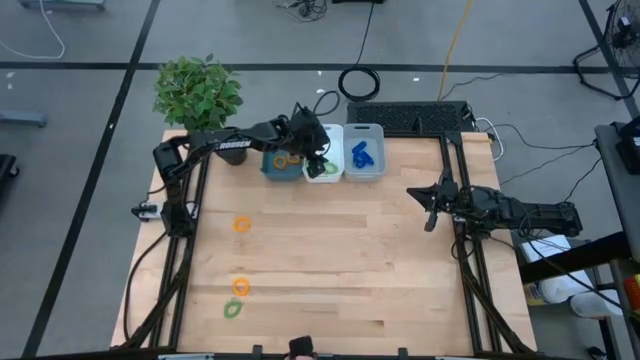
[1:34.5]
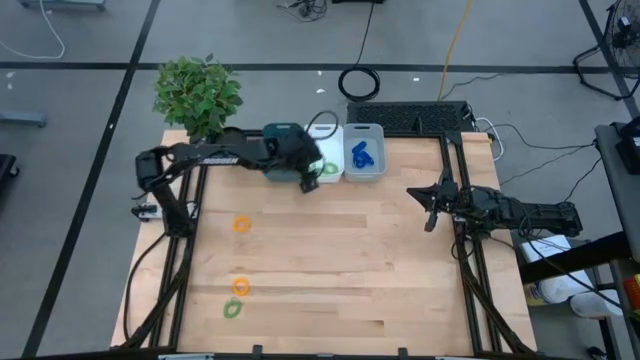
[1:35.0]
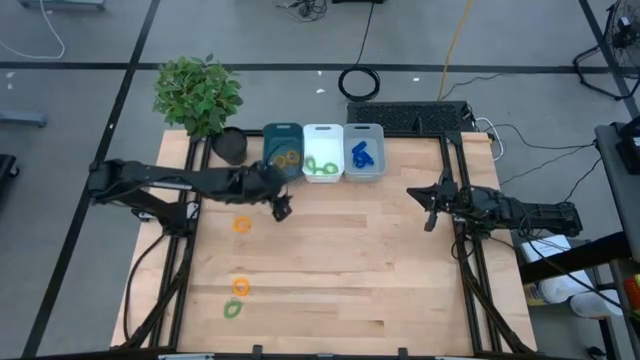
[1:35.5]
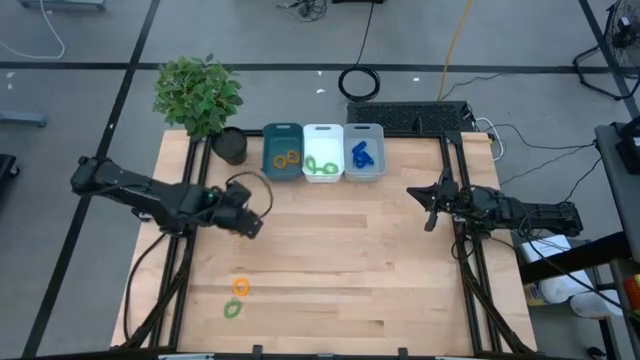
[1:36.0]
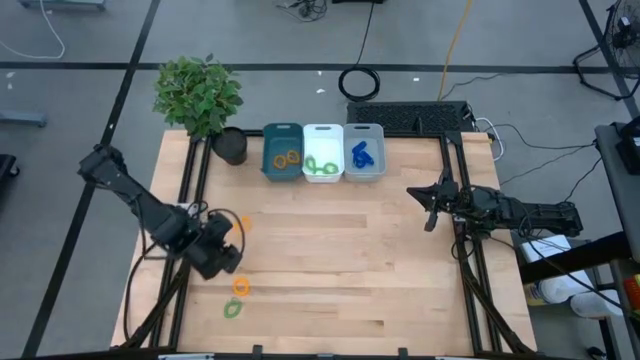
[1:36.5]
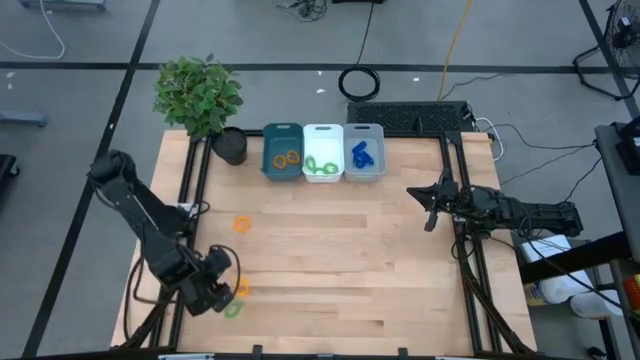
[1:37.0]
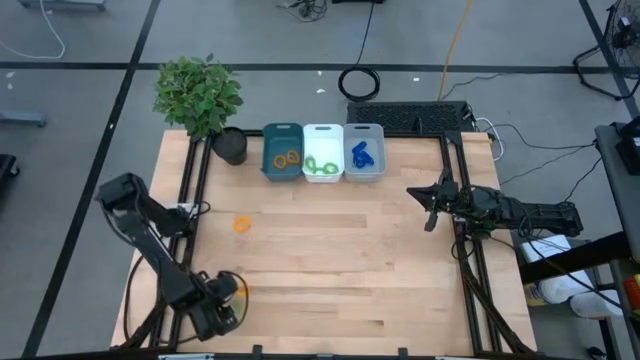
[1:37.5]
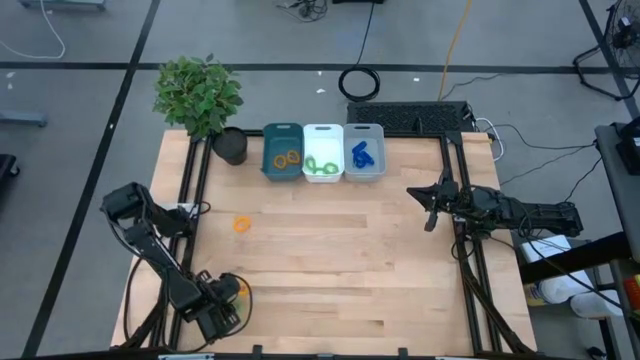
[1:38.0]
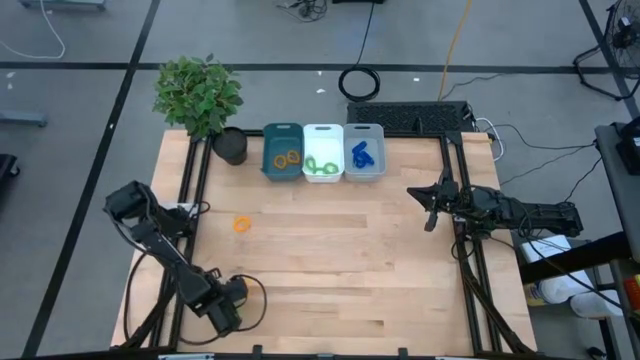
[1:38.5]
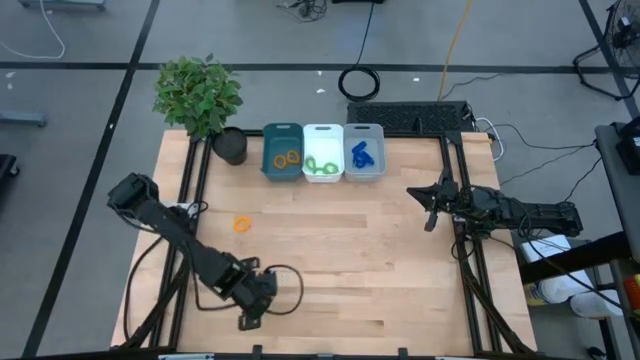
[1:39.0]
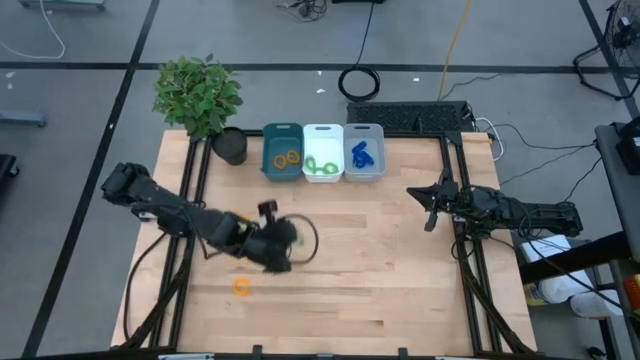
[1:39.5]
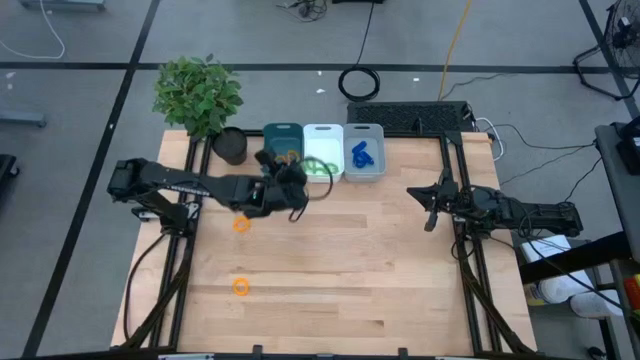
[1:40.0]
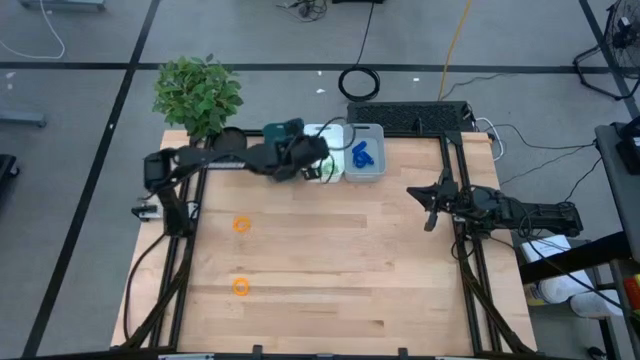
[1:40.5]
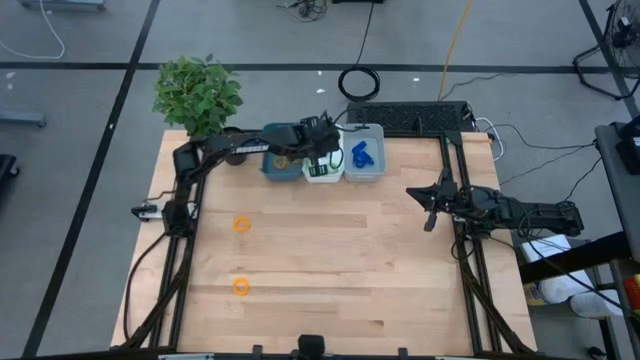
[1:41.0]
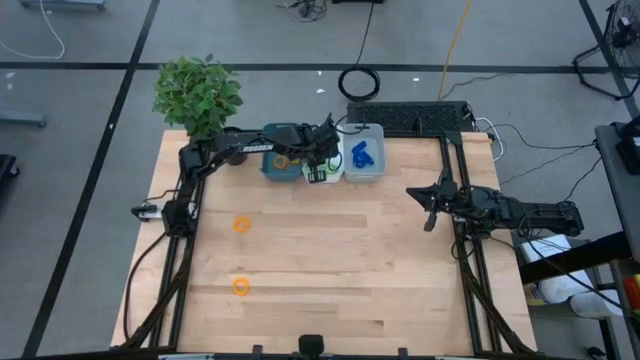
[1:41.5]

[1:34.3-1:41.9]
Task: Sort spring keychains
Put the green spring keychain in the white bin

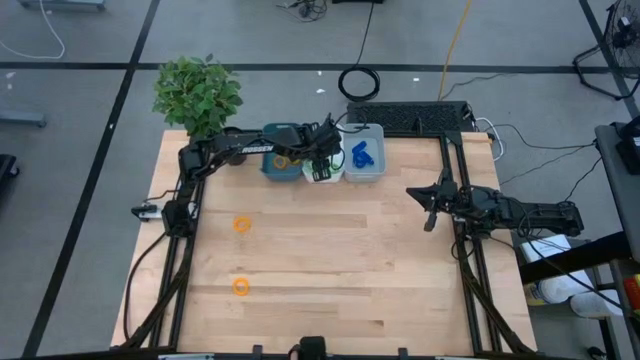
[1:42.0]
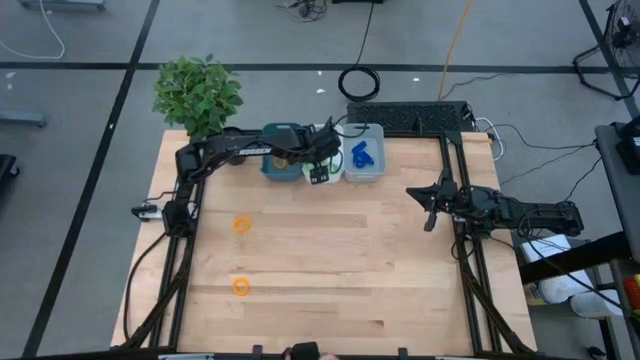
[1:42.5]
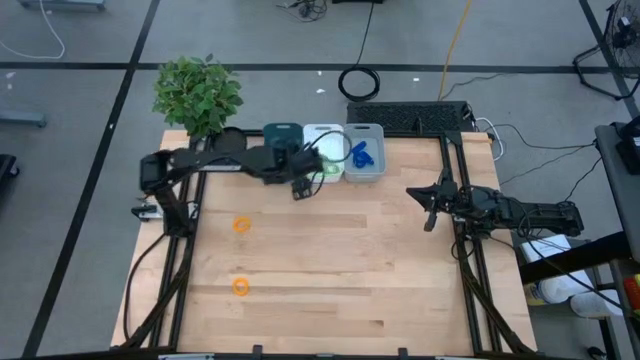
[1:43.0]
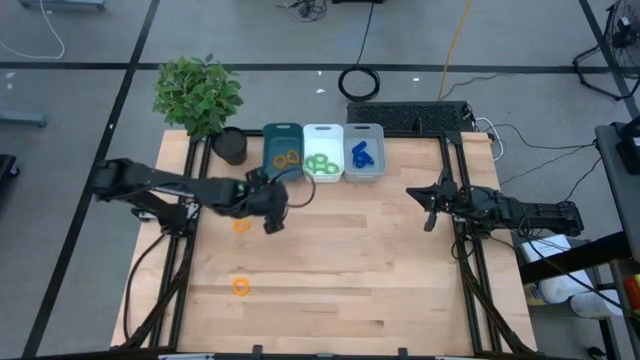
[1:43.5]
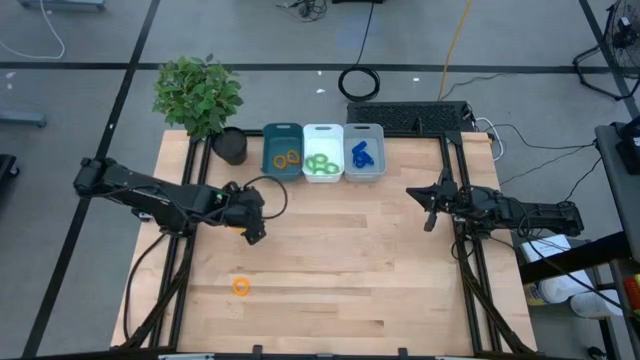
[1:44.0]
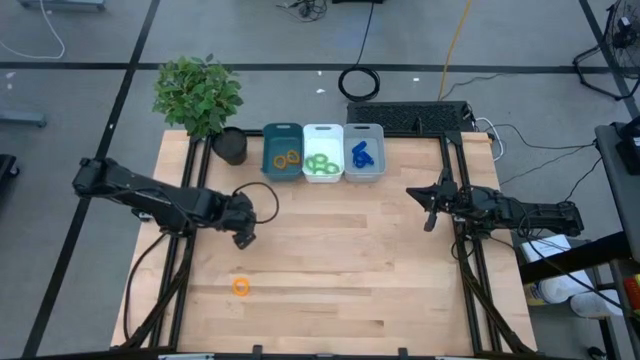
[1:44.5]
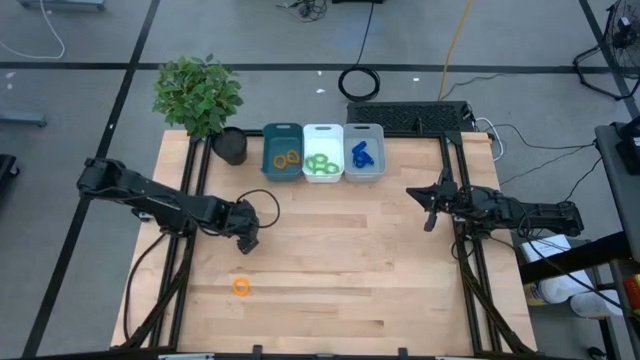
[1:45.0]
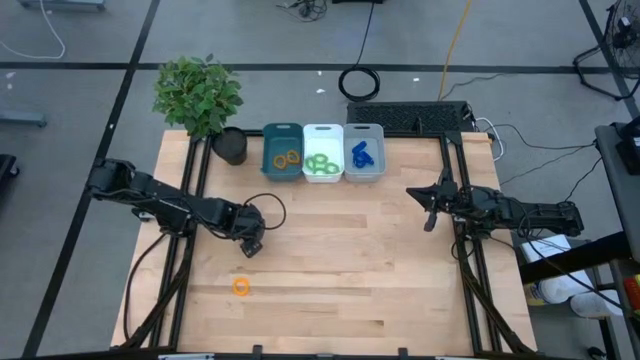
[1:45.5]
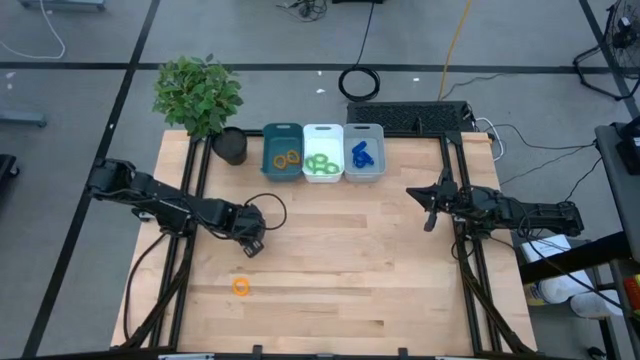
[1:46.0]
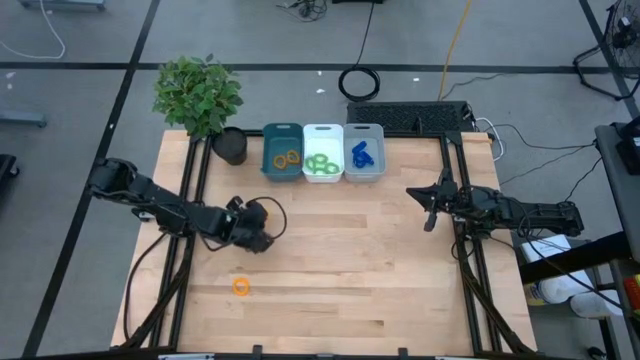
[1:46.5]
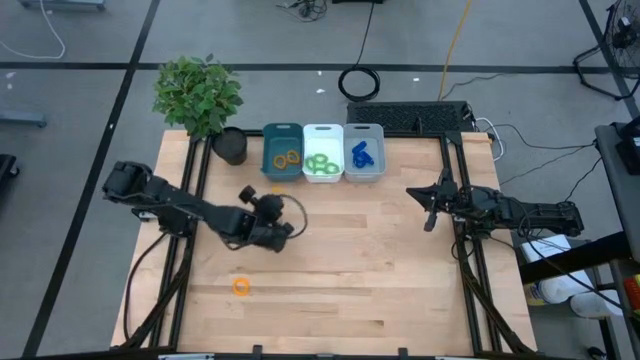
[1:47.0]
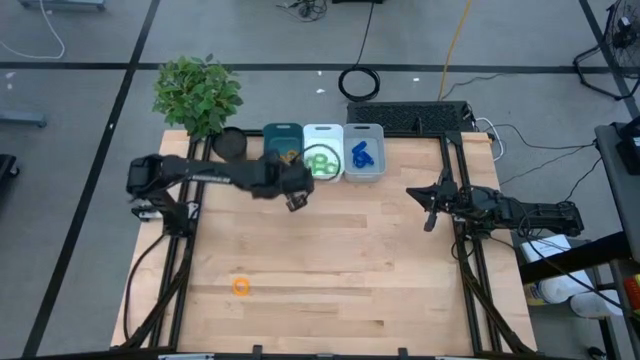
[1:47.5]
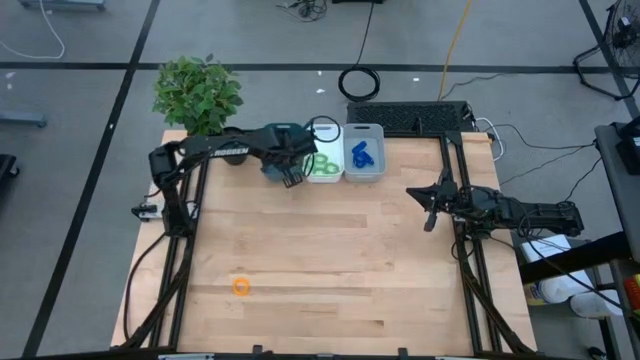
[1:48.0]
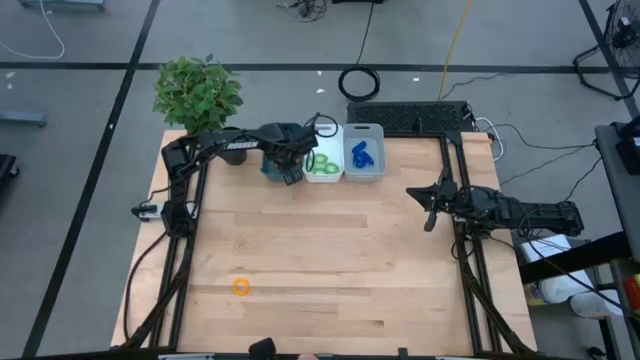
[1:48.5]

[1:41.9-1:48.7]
Put the yellow spring keychain in the blue bin

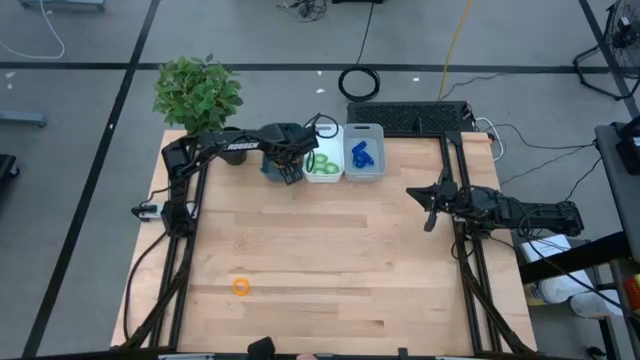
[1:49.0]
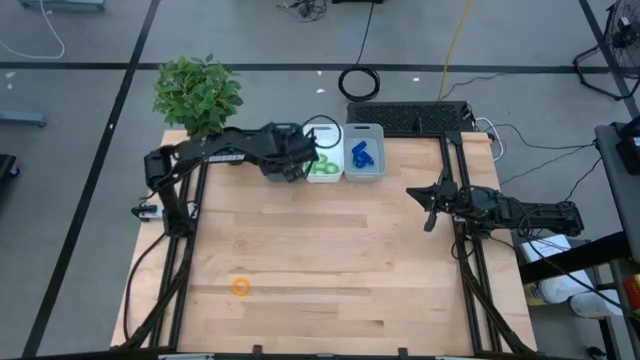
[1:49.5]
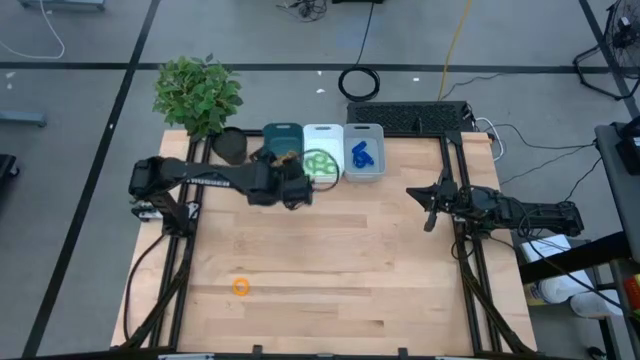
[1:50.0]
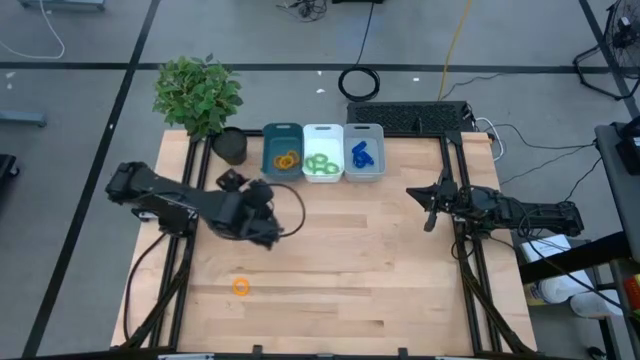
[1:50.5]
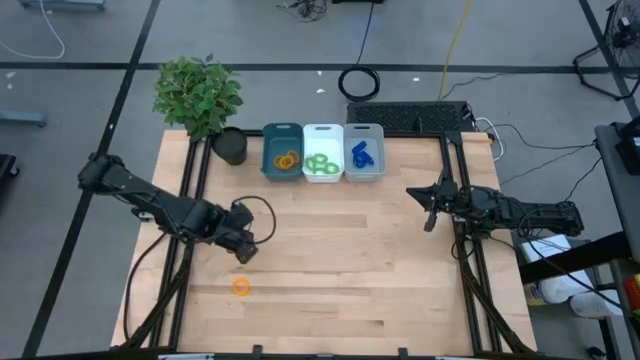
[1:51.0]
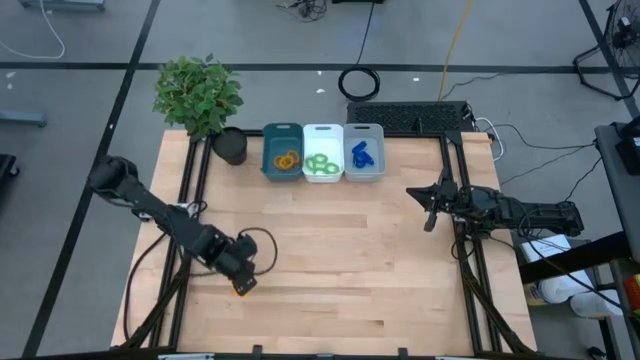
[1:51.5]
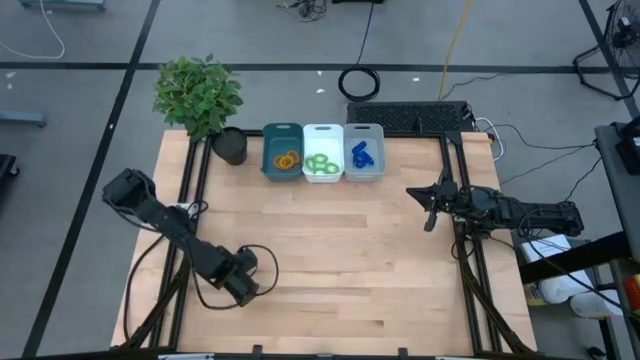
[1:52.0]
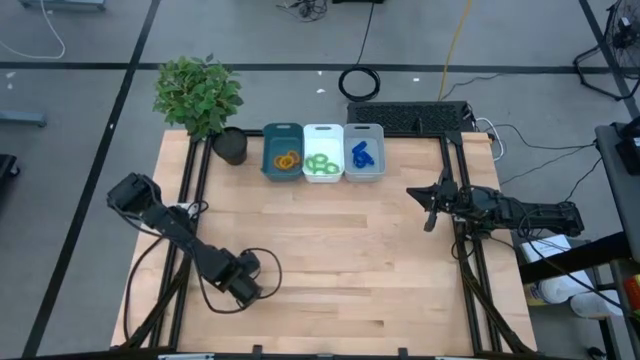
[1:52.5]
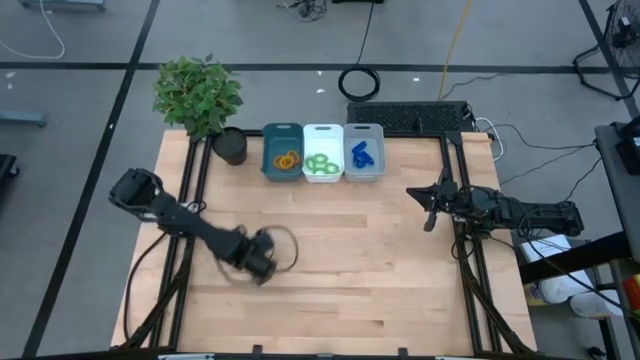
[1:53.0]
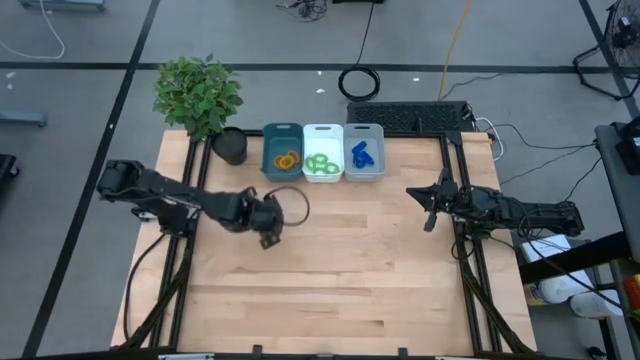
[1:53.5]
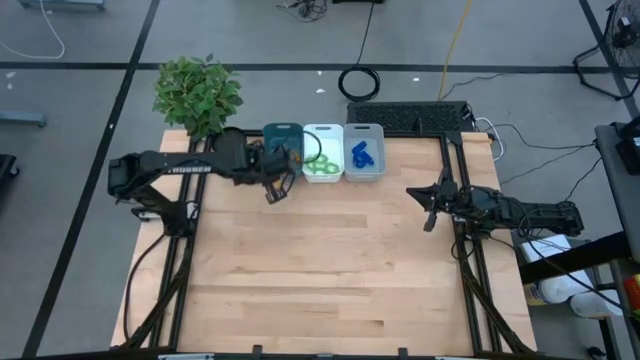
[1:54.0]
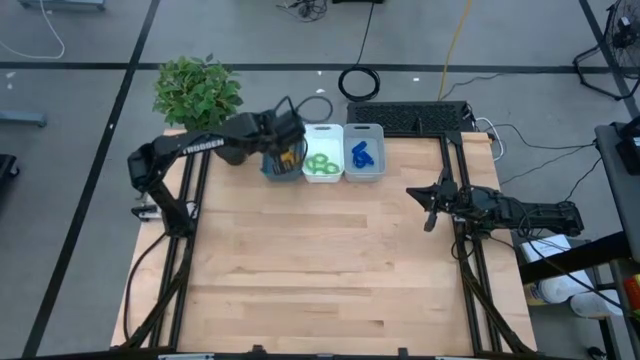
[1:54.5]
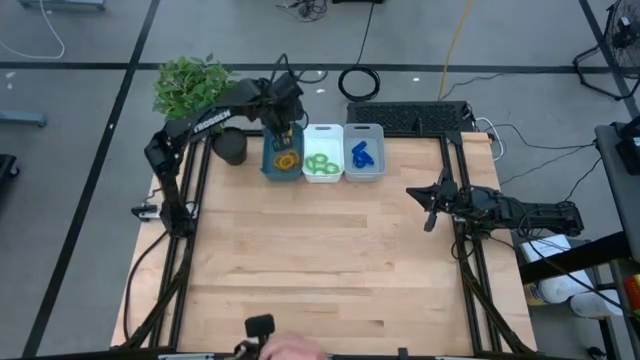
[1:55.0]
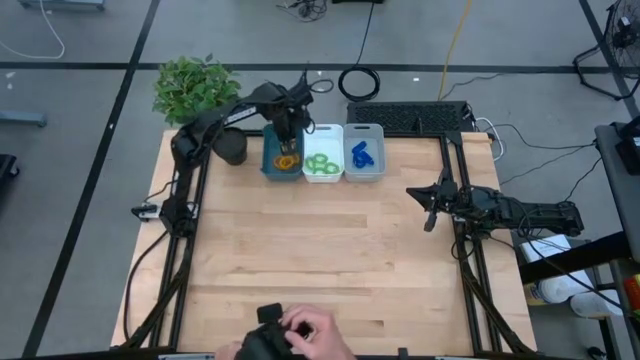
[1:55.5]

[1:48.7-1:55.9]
Put the yellow spring keychain in the blue bin
